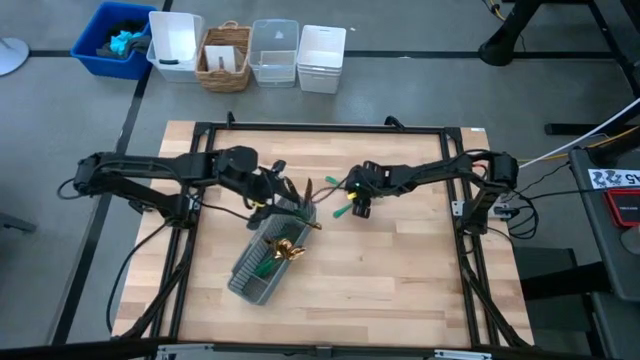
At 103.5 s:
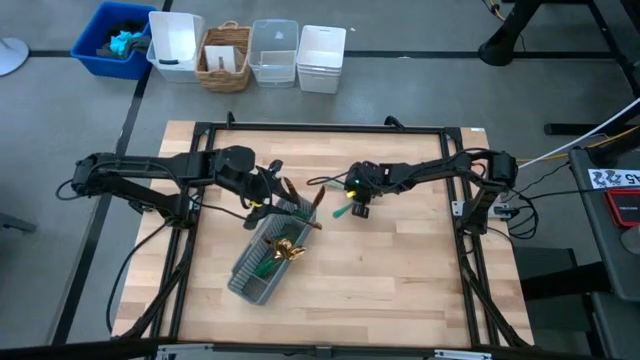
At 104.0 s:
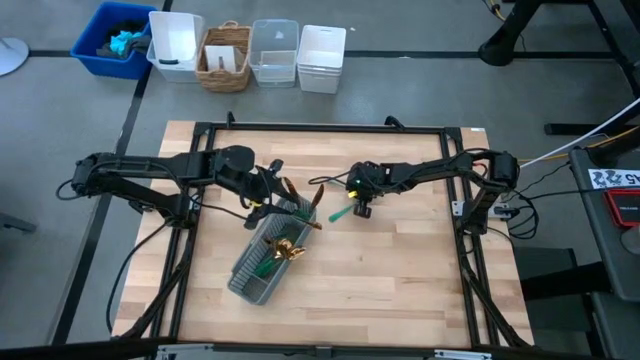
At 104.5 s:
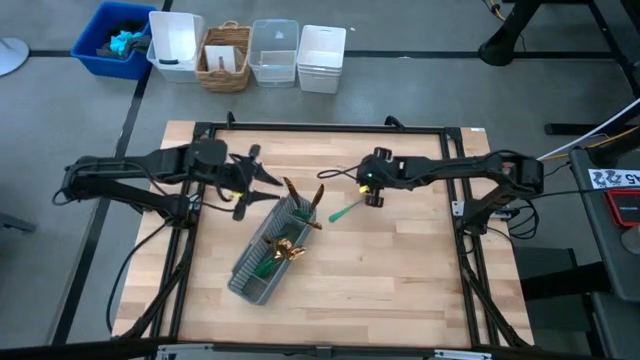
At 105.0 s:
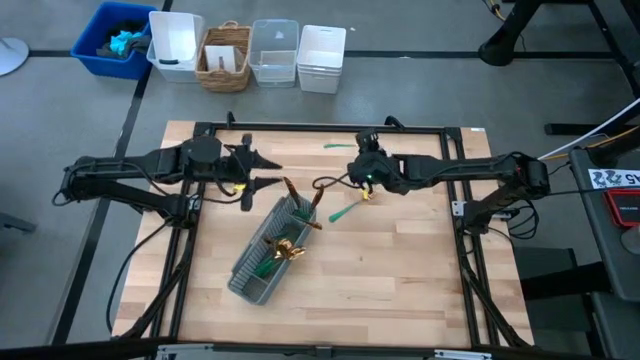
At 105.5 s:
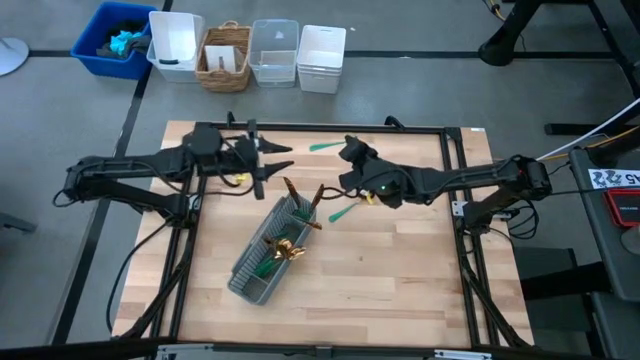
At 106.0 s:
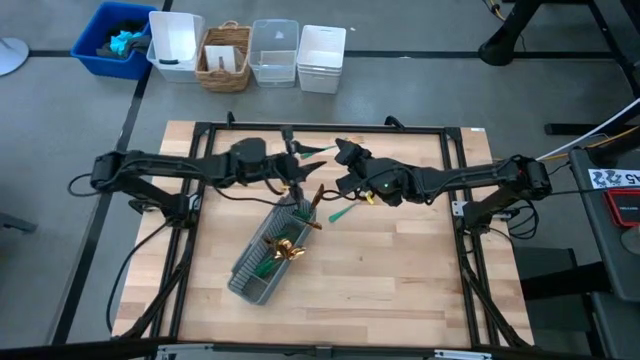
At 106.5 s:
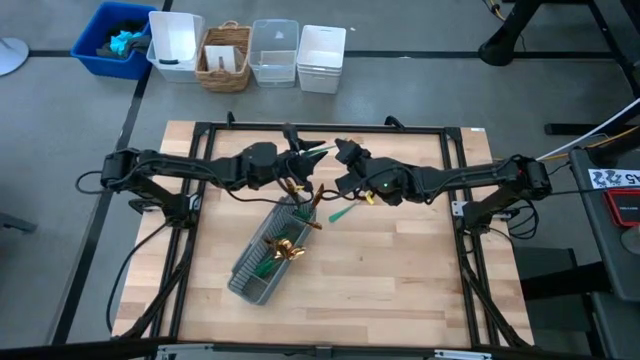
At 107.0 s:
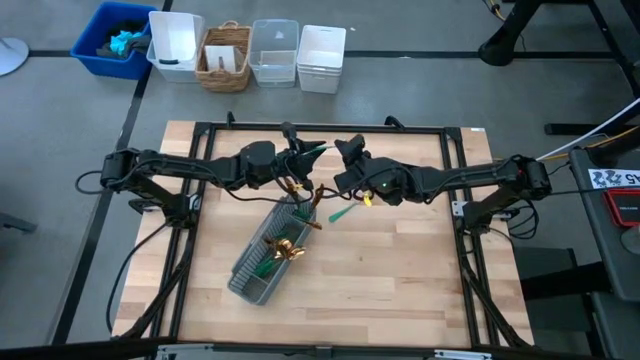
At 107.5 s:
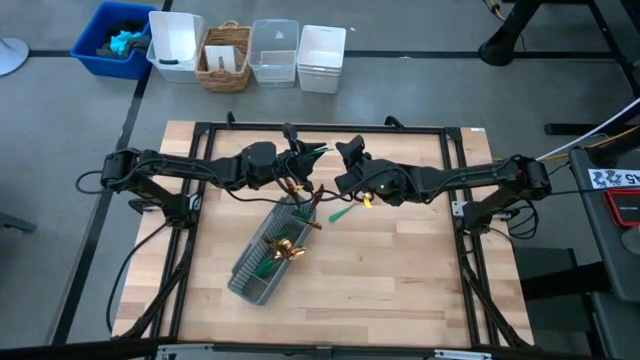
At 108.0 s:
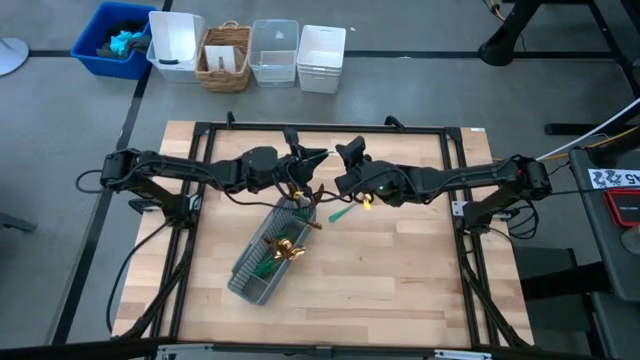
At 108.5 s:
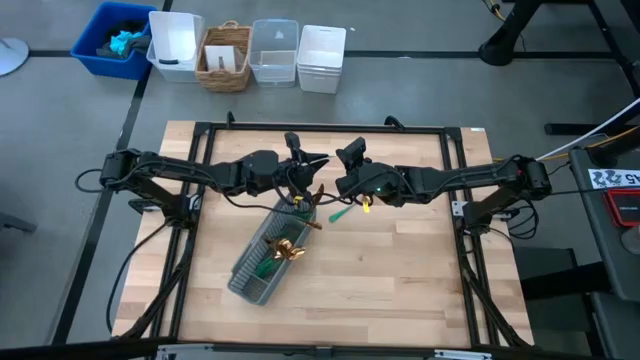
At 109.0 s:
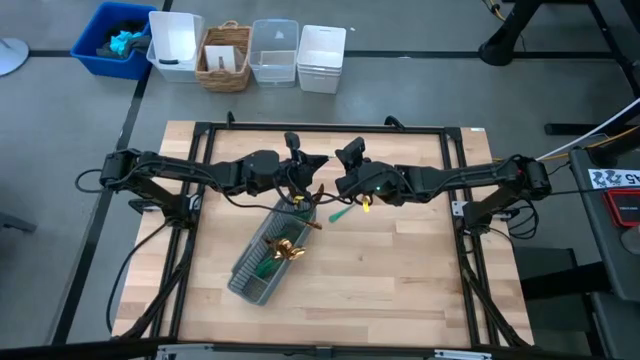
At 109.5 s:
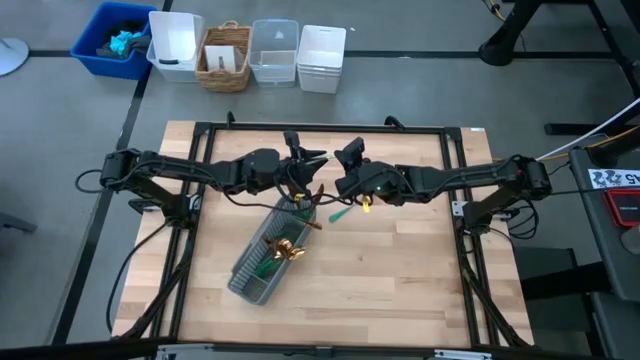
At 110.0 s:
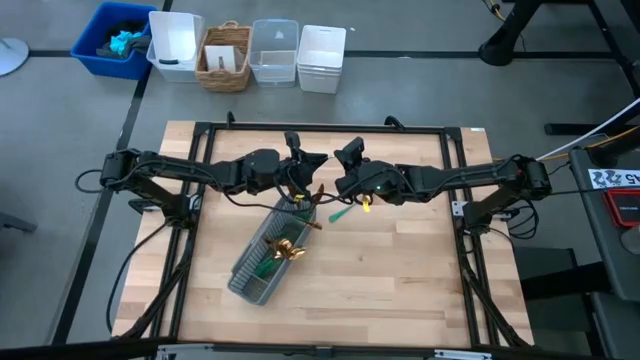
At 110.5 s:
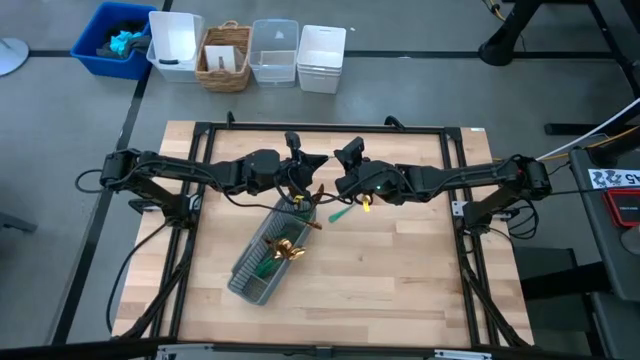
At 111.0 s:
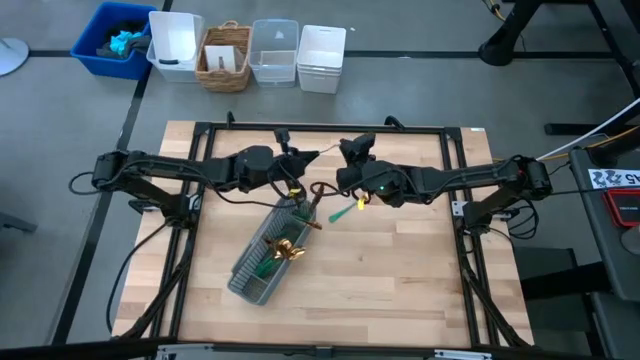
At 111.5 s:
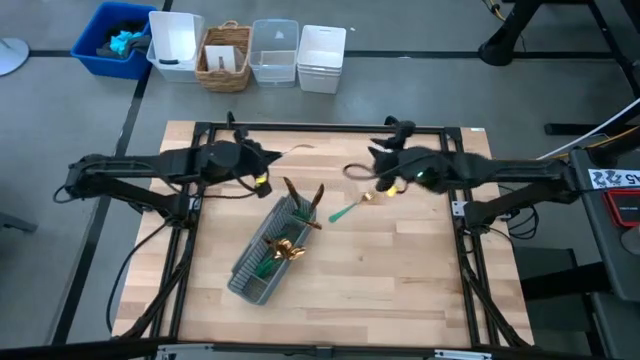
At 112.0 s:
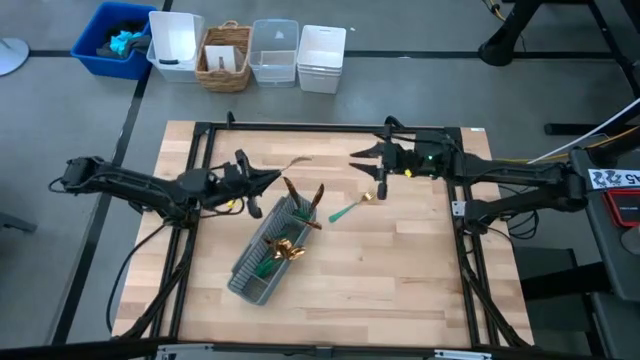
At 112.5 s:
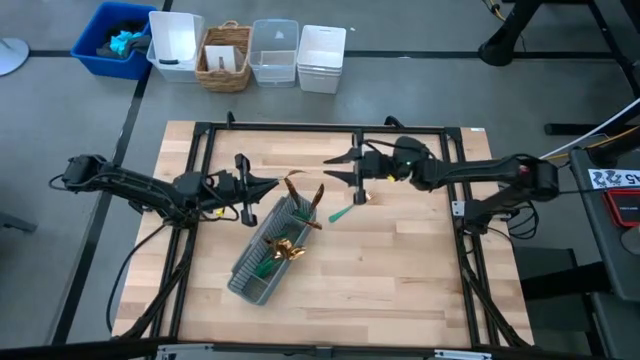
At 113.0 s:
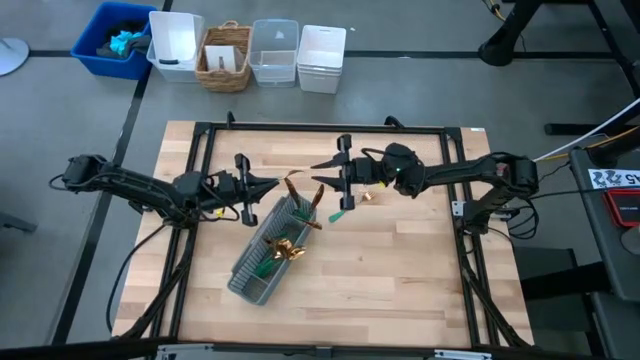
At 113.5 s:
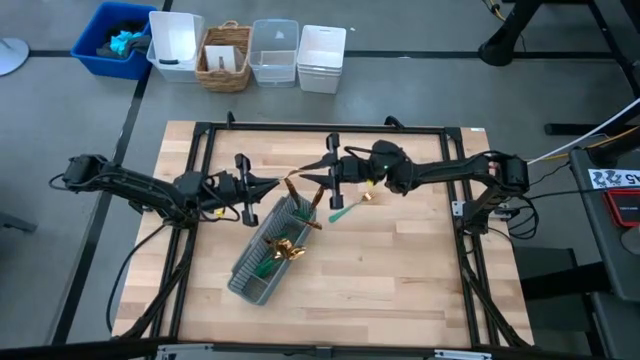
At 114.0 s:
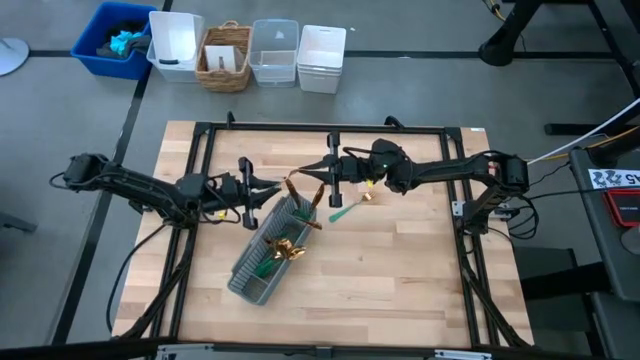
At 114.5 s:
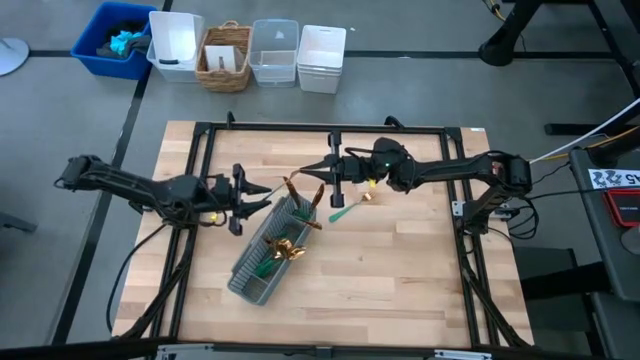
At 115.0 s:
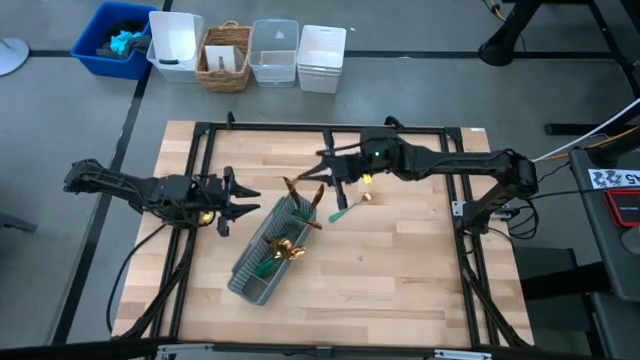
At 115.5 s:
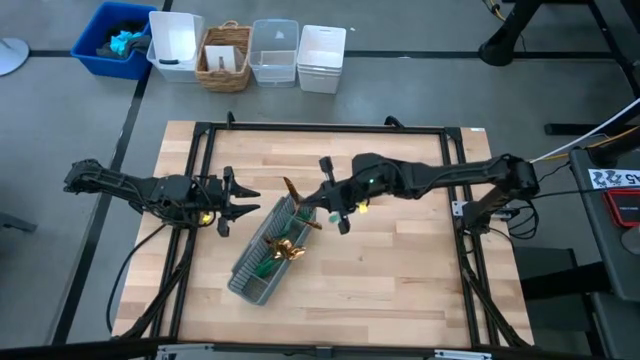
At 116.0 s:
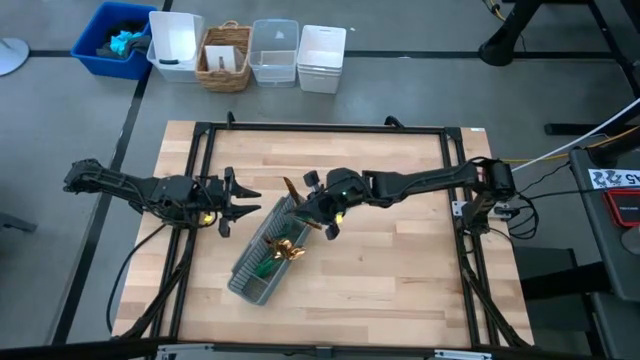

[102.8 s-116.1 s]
Task: Sort silverware
Put the green fork into the silverware basket

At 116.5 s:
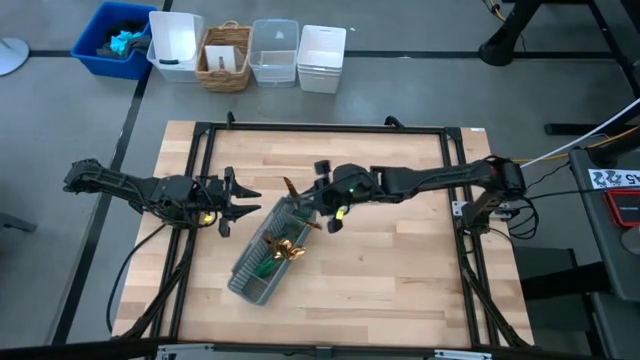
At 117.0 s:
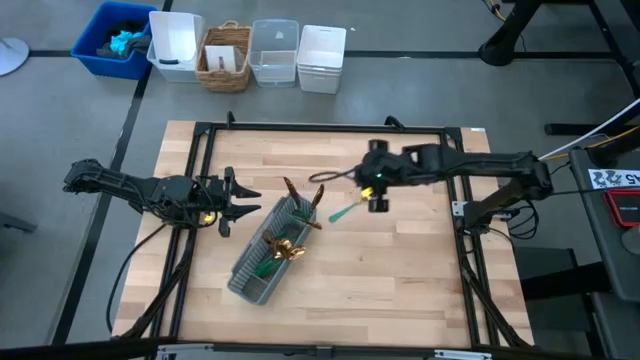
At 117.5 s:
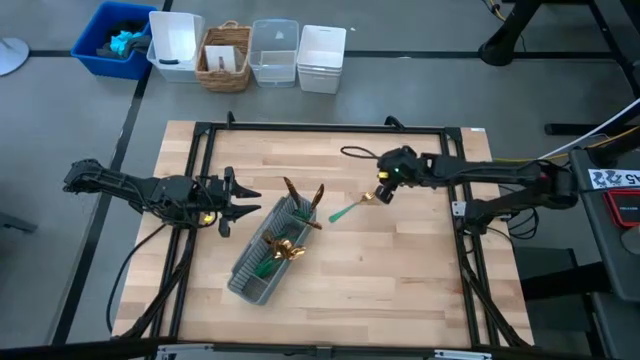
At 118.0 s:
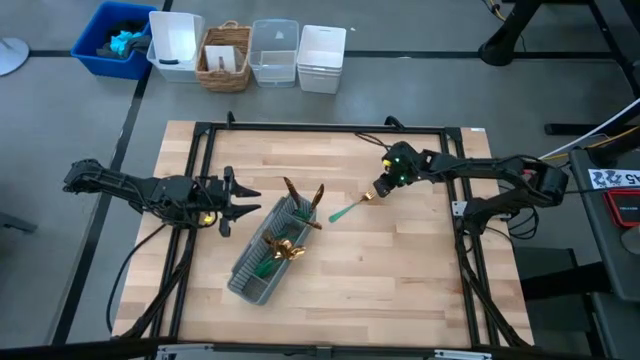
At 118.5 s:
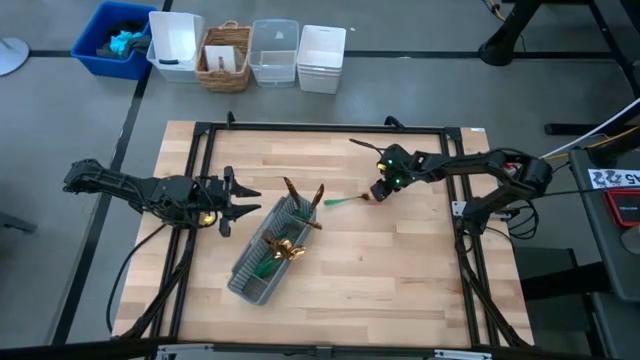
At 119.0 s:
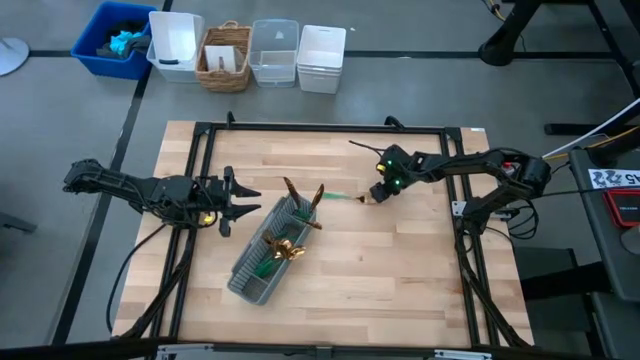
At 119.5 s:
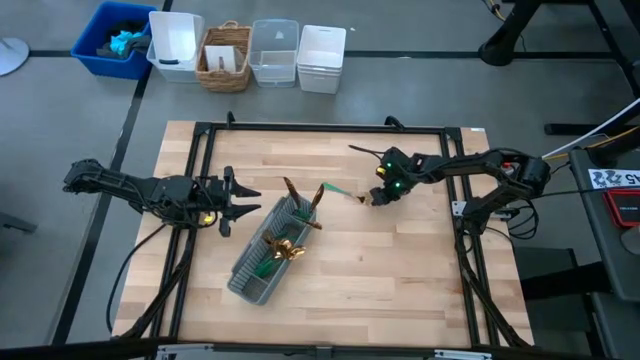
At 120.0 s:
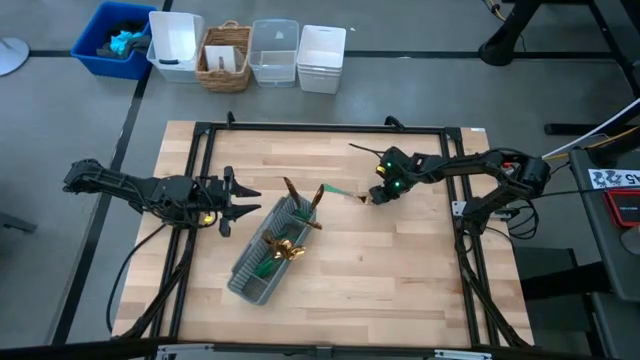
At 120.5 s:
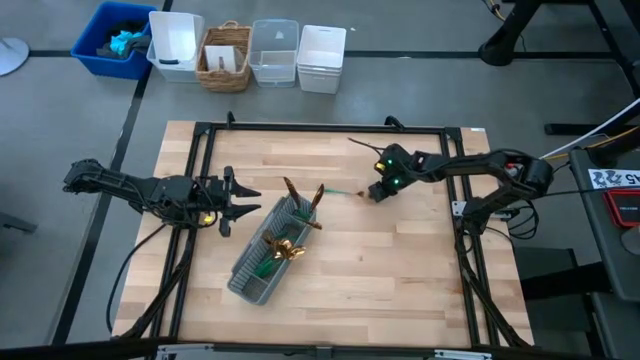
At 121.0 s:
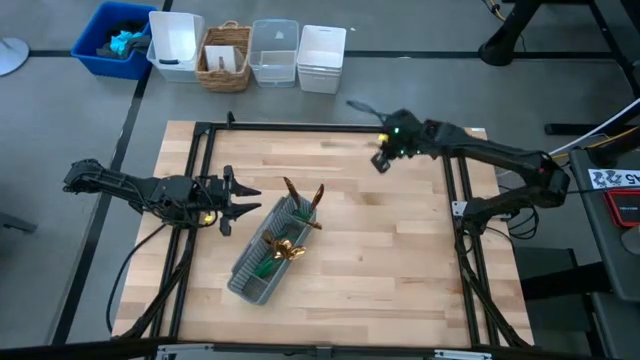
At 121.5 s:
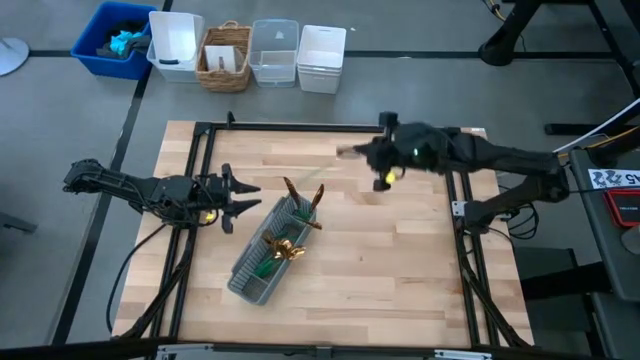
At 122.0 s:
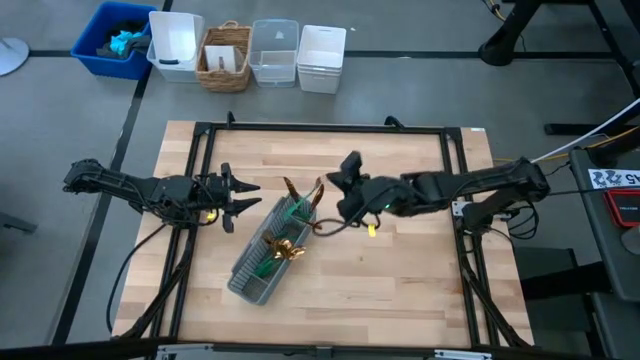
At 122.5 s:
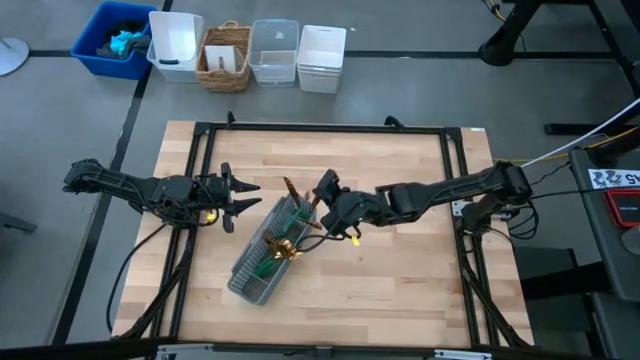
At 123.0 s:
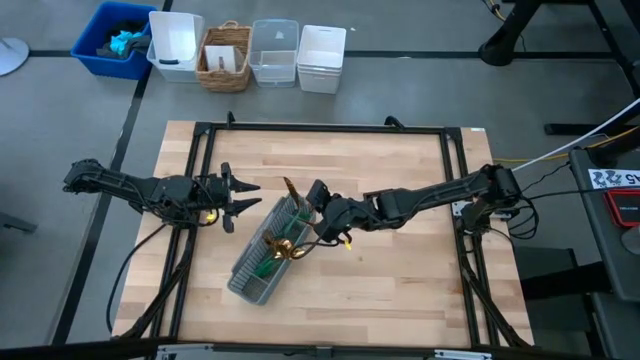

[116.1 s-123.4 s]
Put the green fork into the silverware basket
